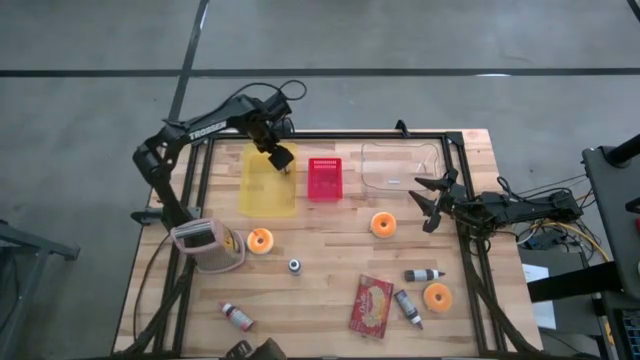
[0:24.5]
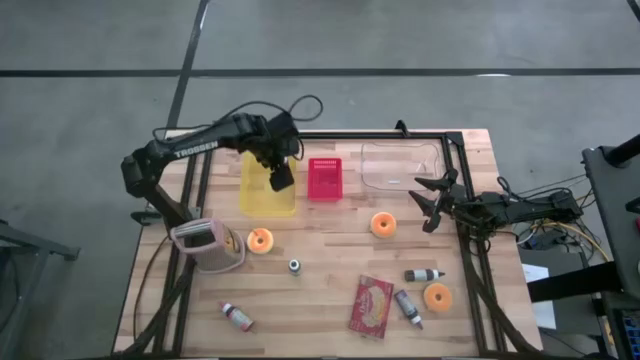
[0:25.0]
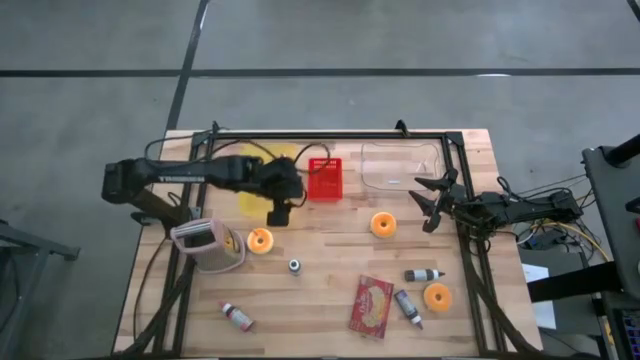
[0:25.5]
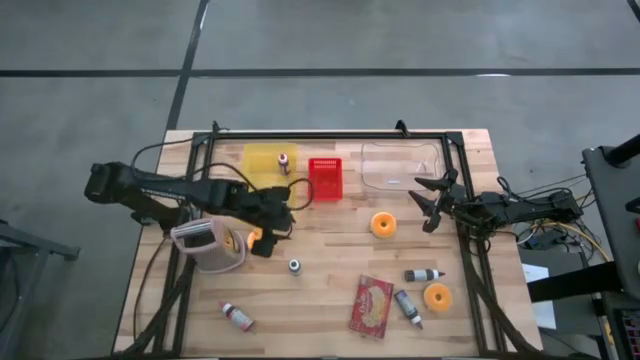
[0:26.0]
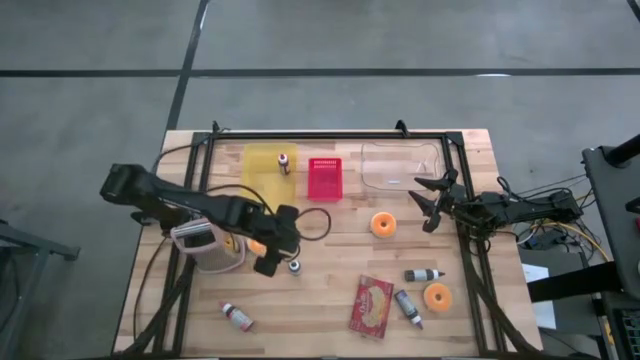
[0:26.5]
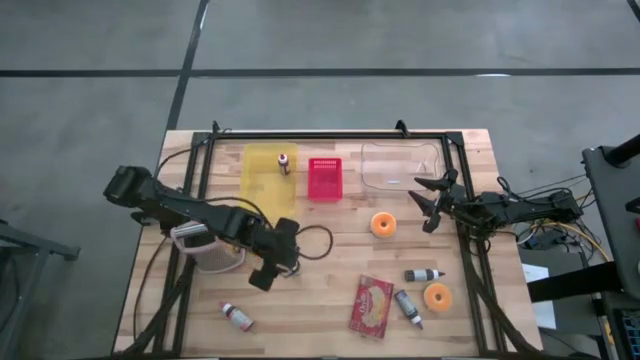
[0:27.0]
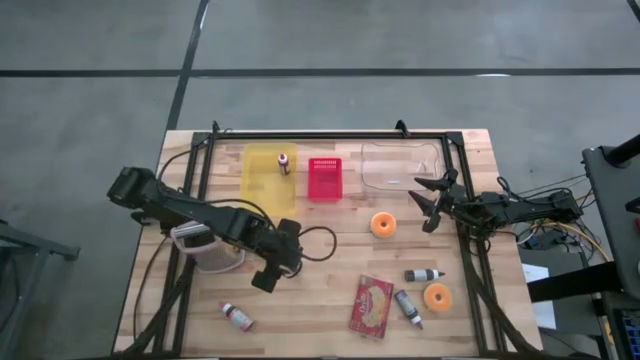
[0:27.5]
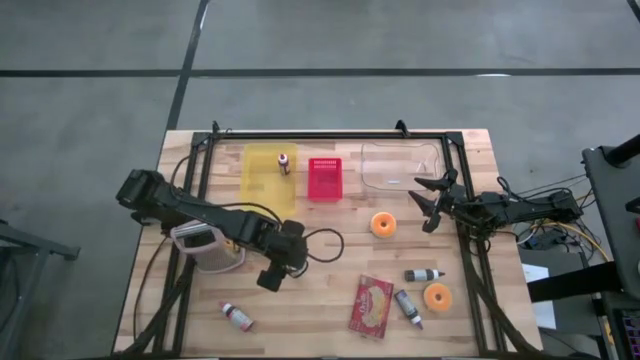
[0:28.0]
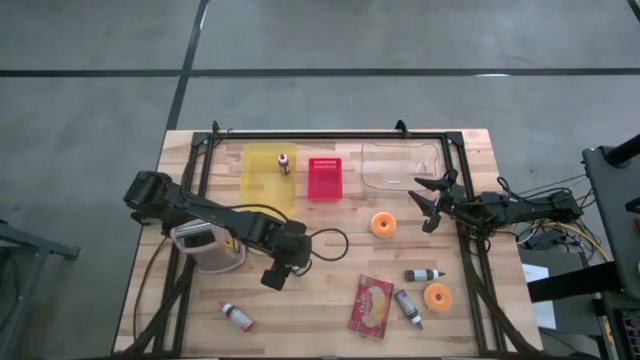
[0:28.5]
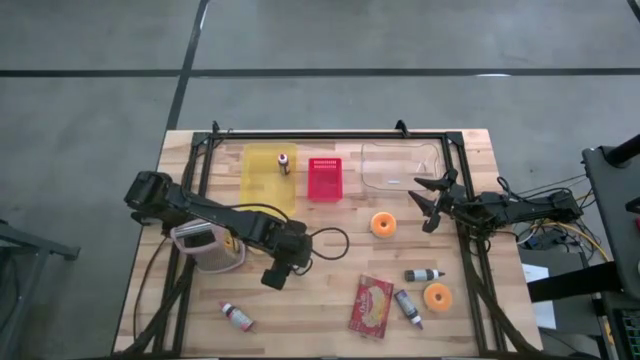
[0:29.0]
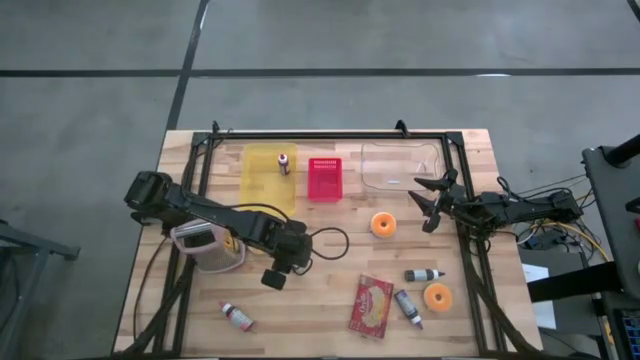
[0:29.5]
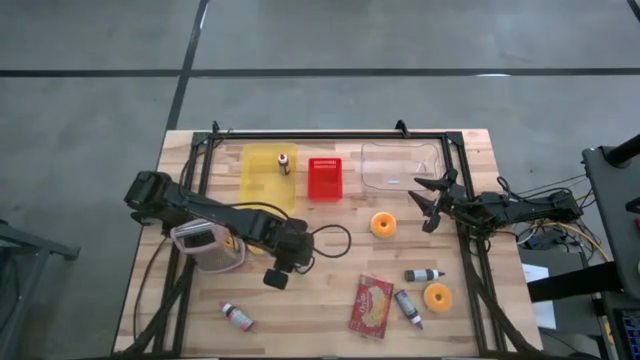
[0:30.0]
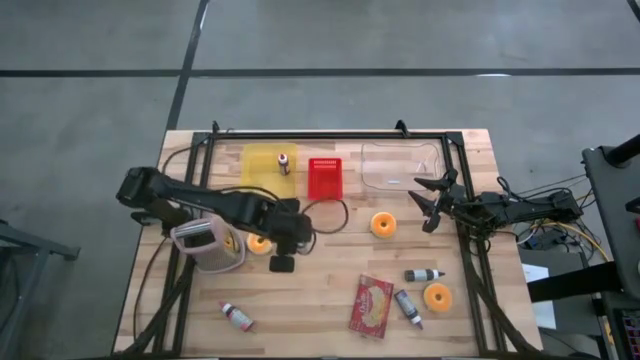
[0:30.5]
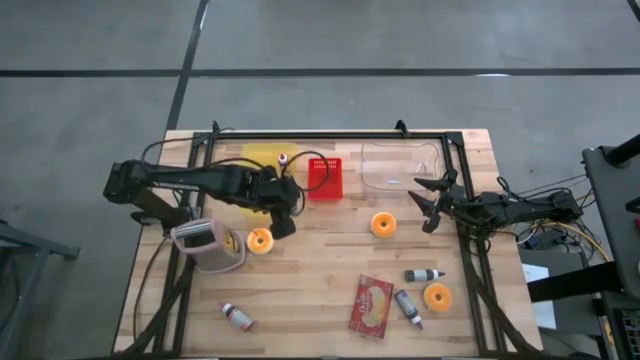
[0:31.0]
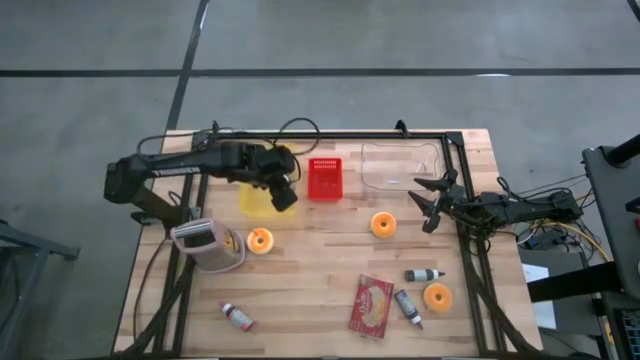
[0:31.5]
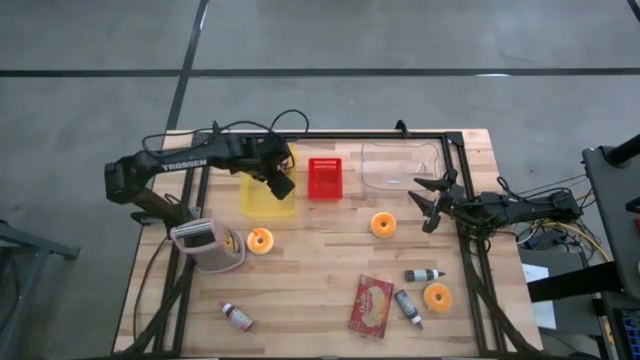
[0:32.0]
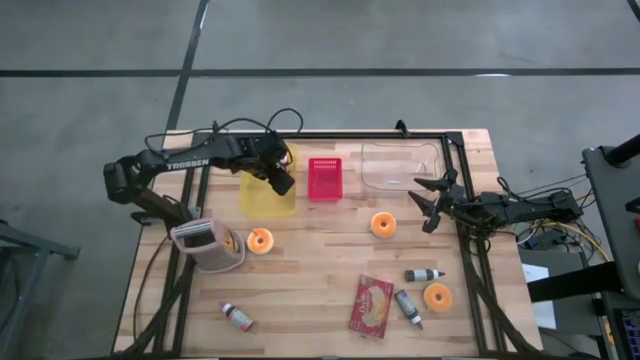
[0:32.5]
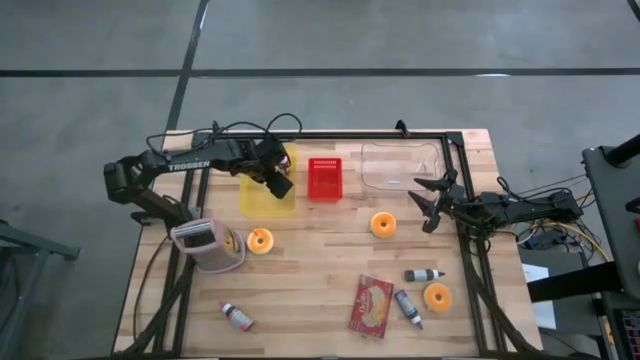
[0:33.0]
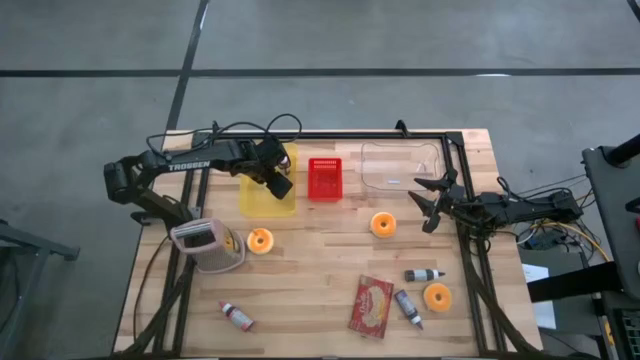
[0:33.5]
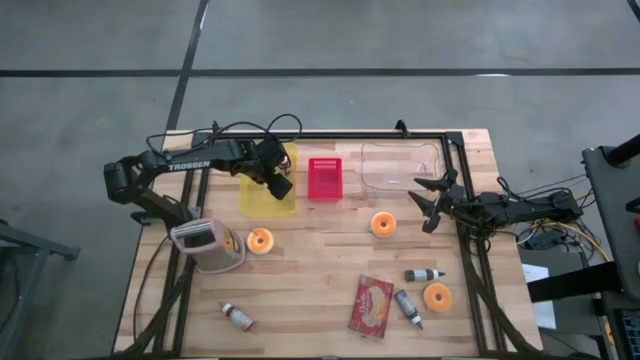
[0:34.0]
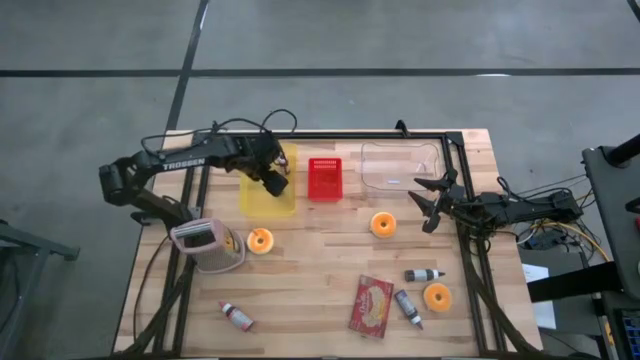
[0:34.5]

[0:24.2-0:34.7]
Task: Pick & Place Food Item
Put the left black food coloring bottle into the yellow bin

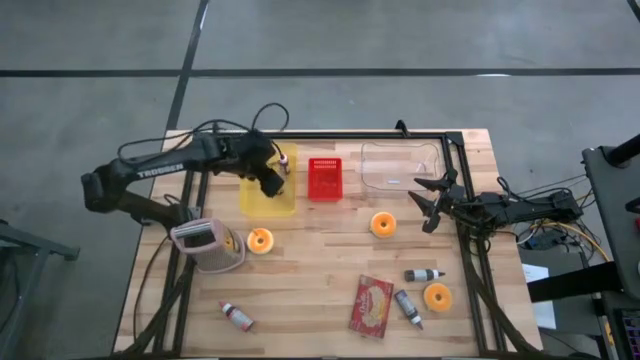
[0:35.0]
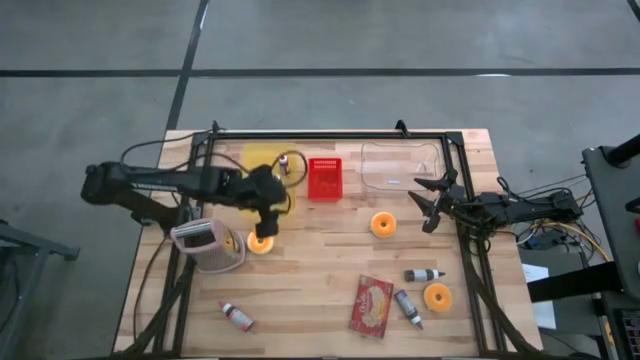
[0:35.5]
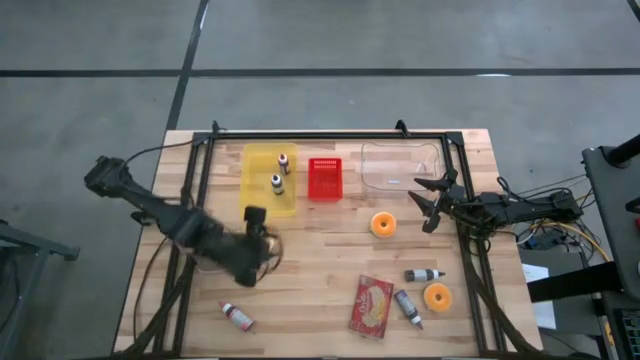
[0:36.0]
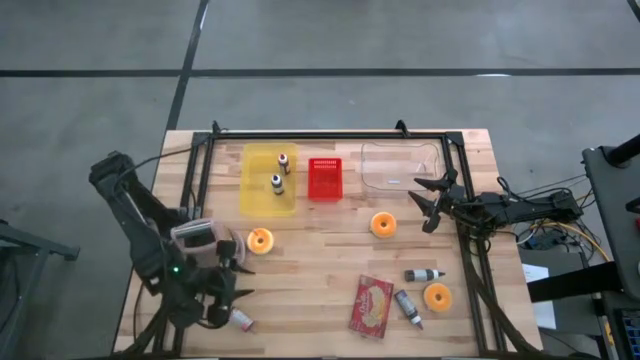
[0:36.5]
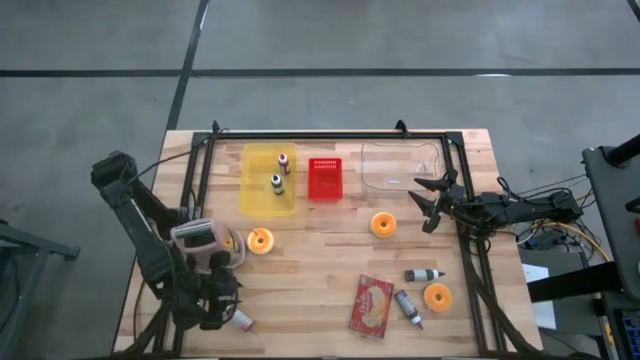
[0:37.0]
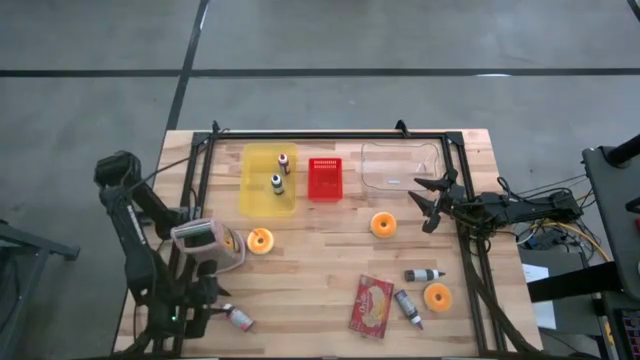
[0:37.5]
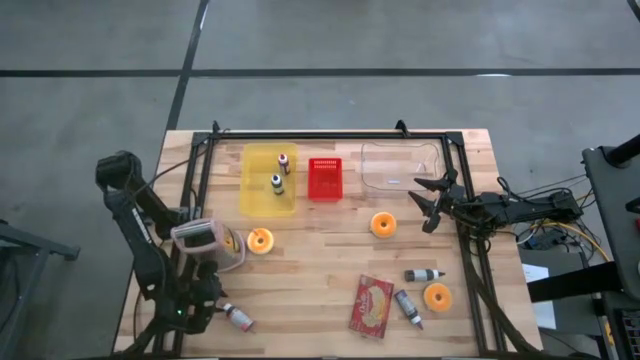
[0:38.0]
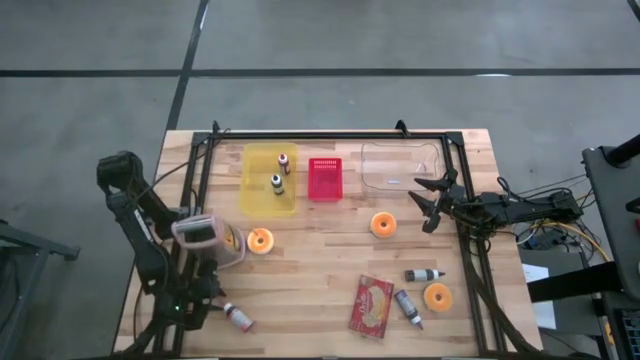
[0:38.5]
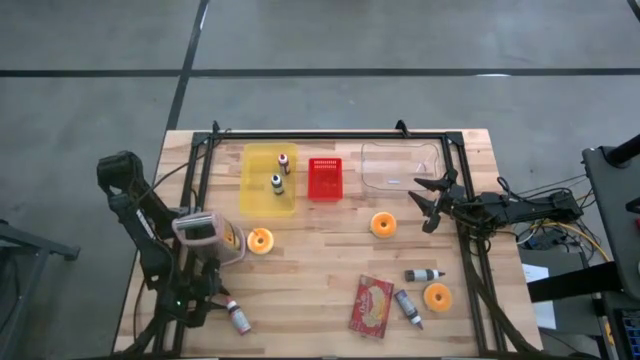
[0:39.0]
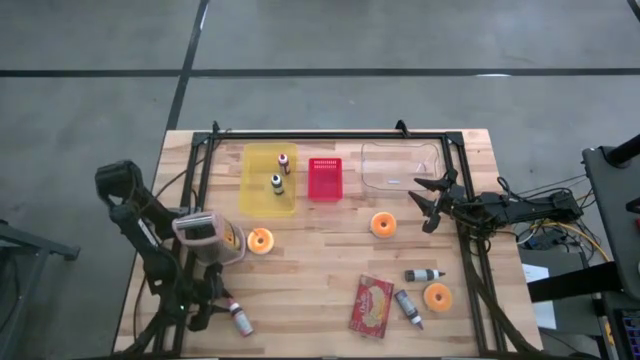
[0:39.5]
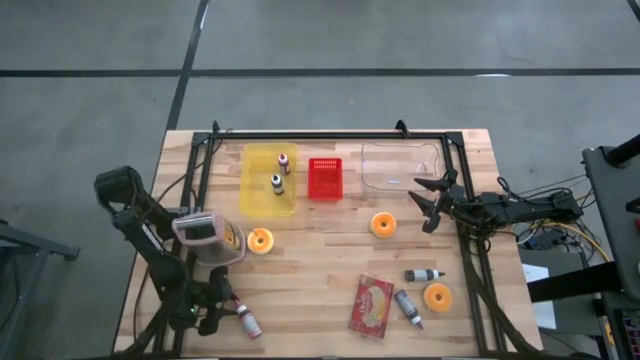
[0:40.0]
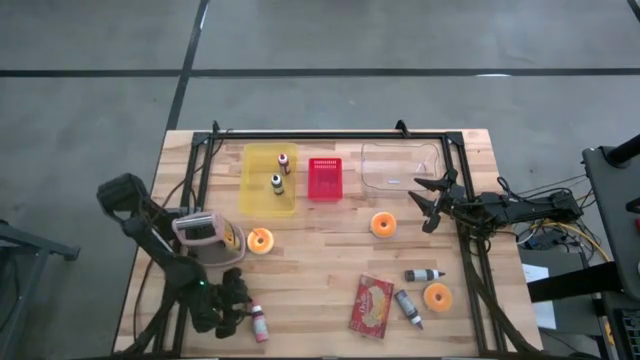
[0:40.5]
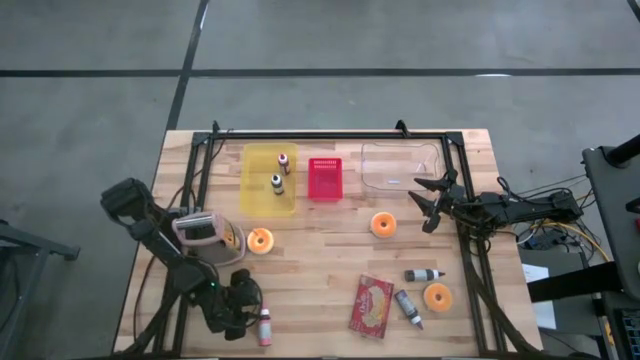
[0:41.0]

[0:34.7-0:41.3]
Put the pink food coloring bottle into the yellow bin

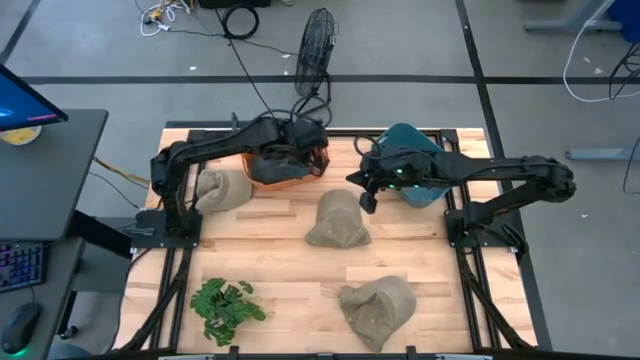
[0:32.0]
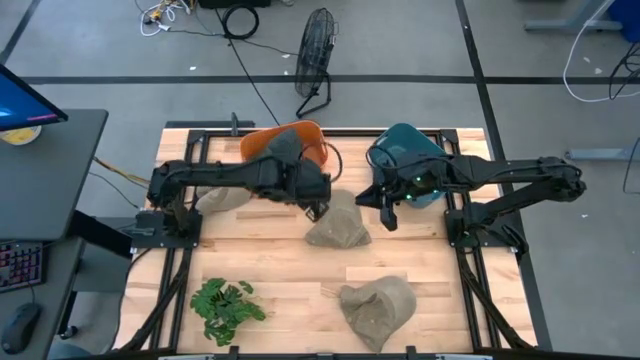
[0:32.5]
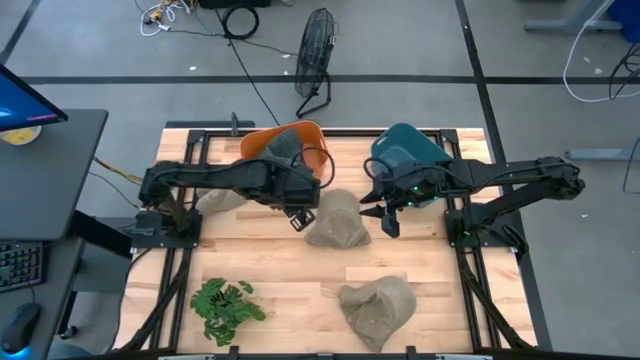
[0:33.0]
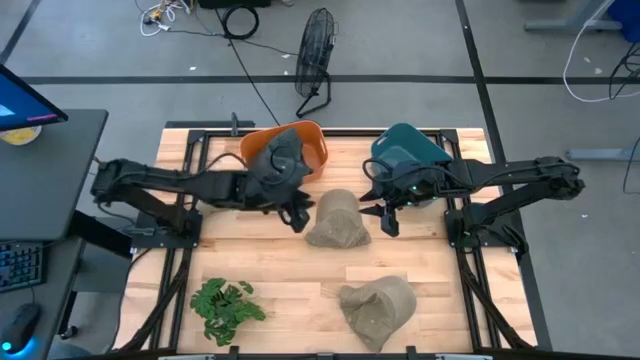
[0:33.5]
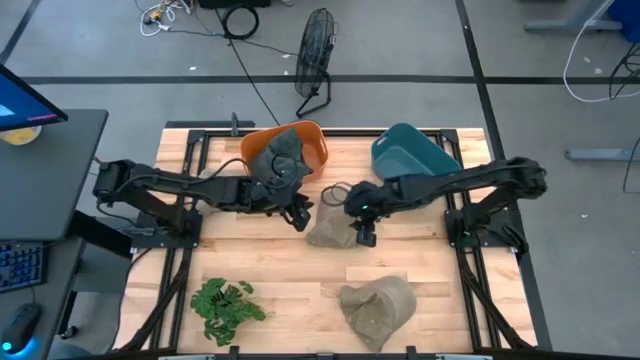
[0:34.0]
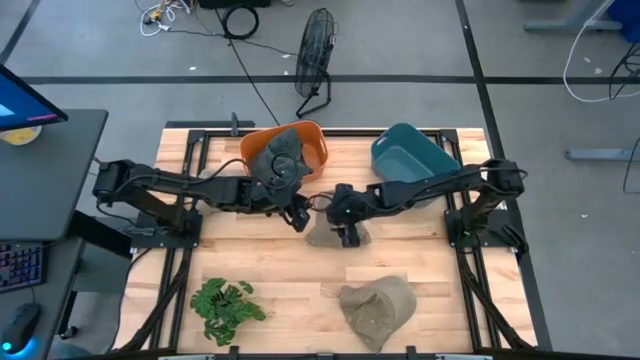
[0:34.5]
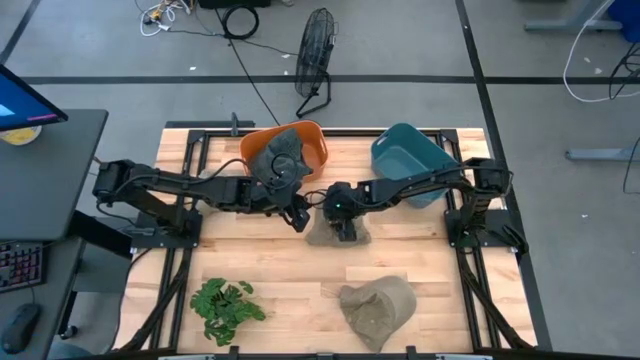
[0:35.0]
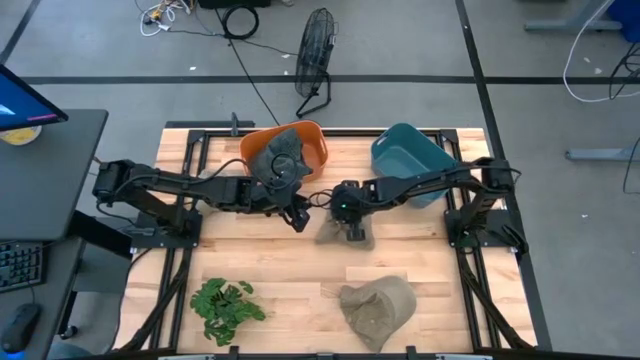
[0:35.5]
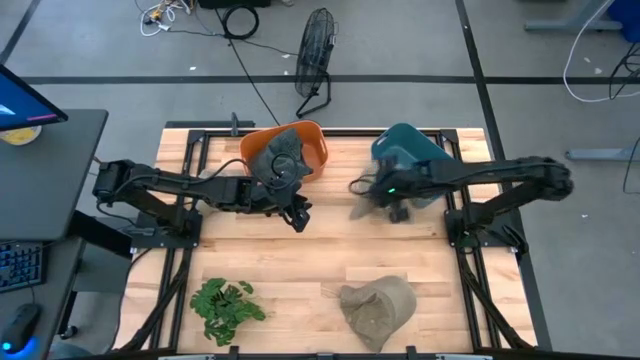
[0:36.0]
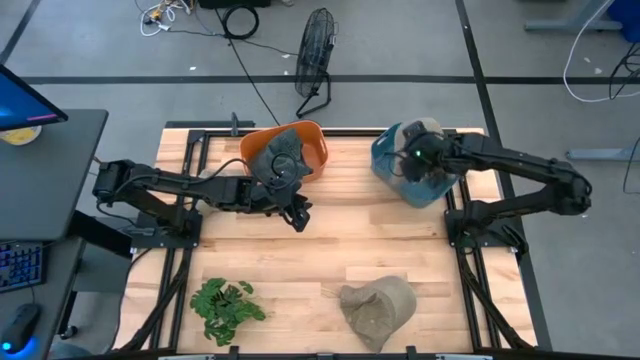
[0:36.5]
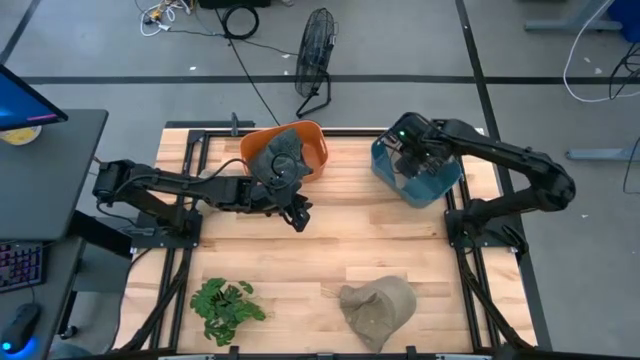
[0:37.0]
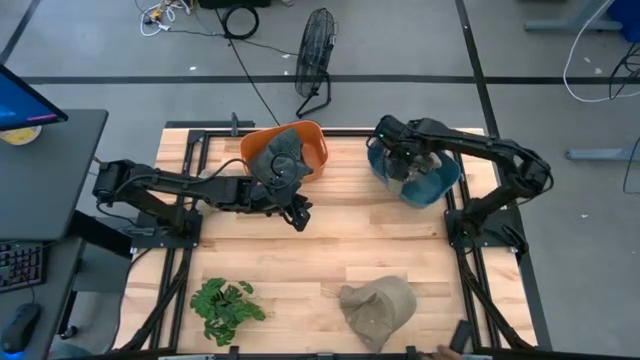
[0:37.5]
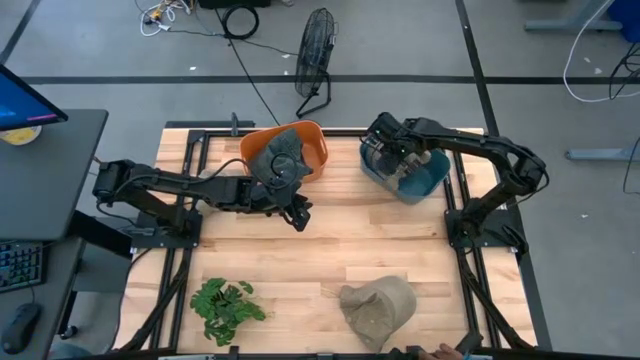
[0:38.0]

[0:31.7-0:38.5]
Task: Pick & Place hat
Put the middle brown cap into the blue bin
